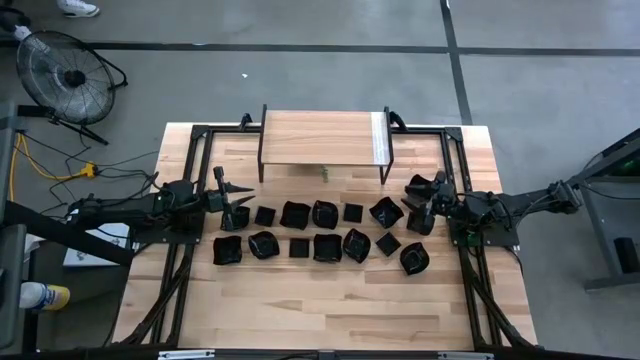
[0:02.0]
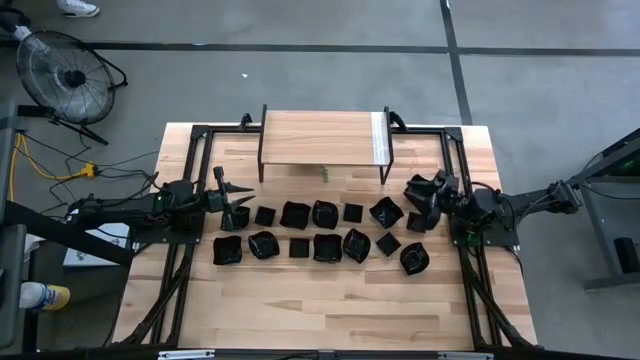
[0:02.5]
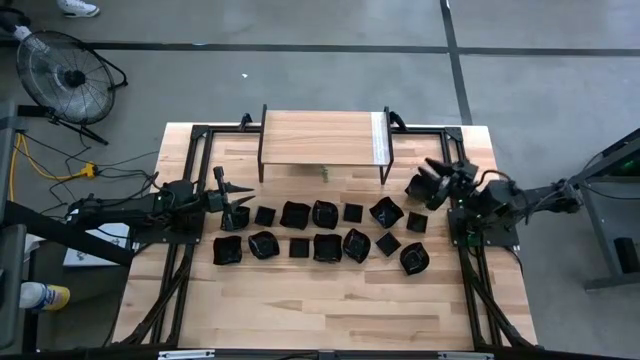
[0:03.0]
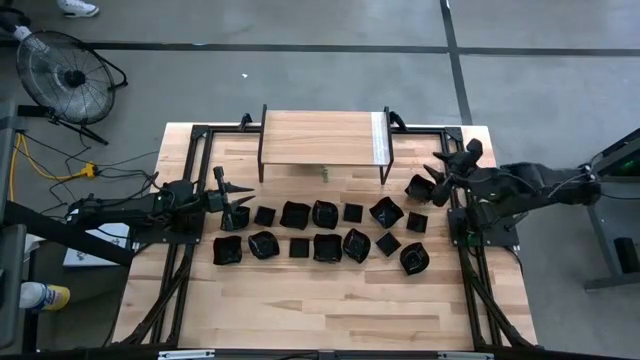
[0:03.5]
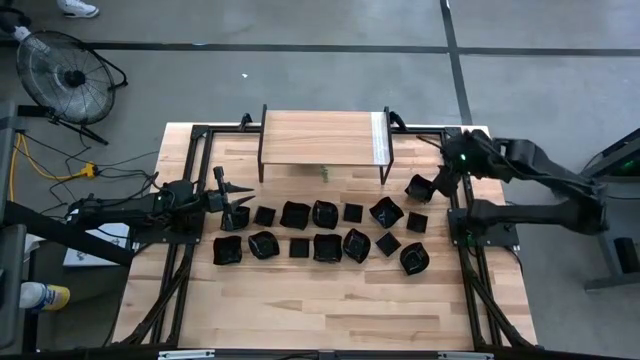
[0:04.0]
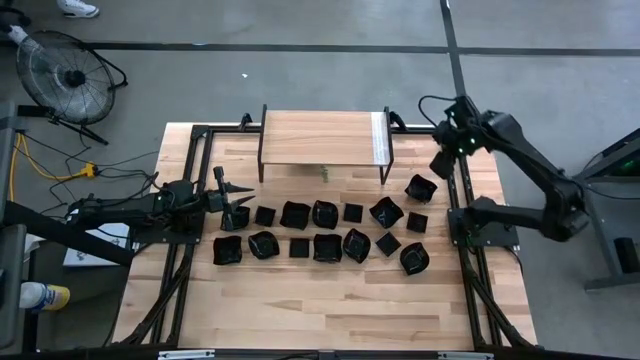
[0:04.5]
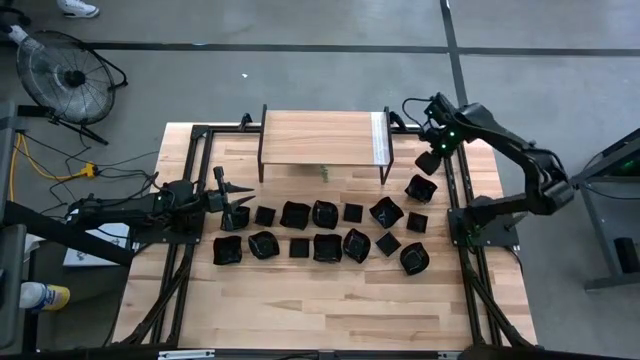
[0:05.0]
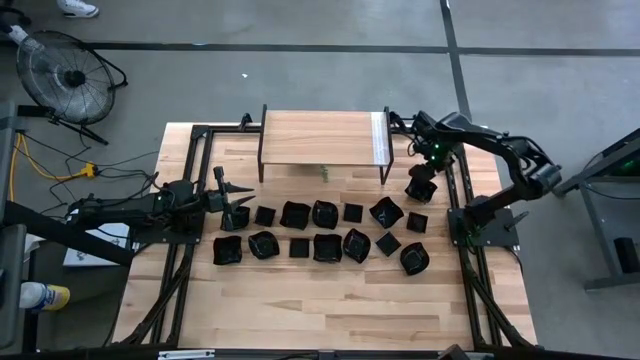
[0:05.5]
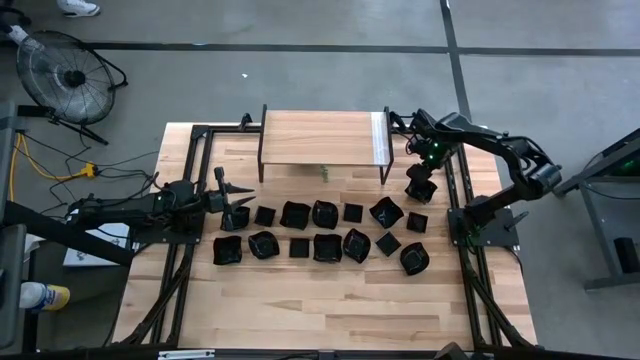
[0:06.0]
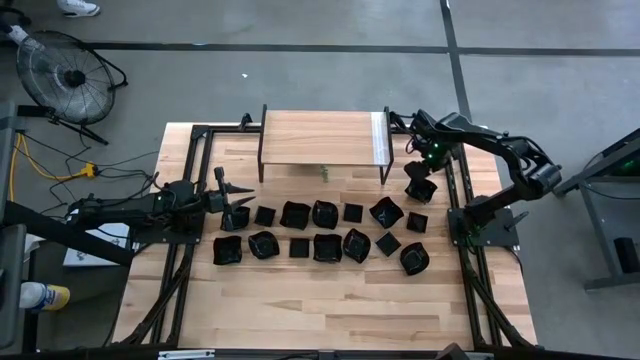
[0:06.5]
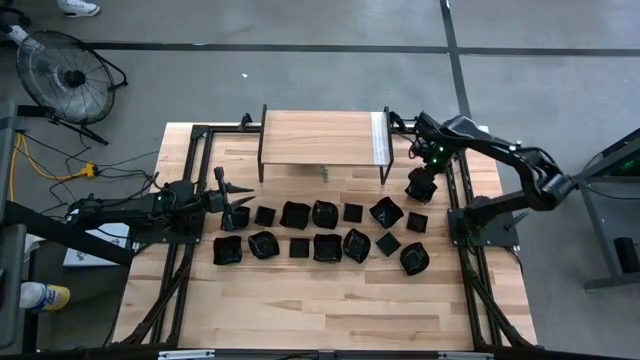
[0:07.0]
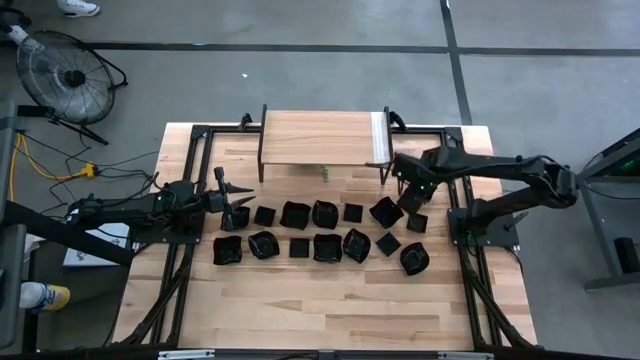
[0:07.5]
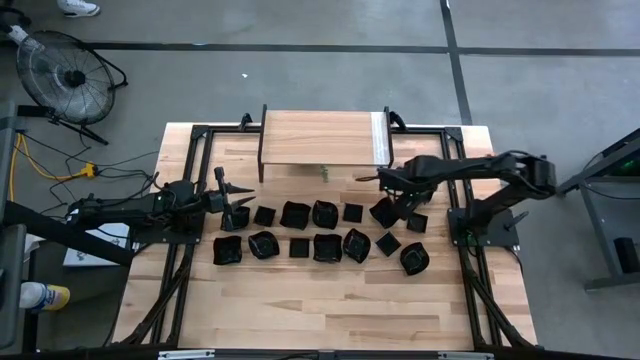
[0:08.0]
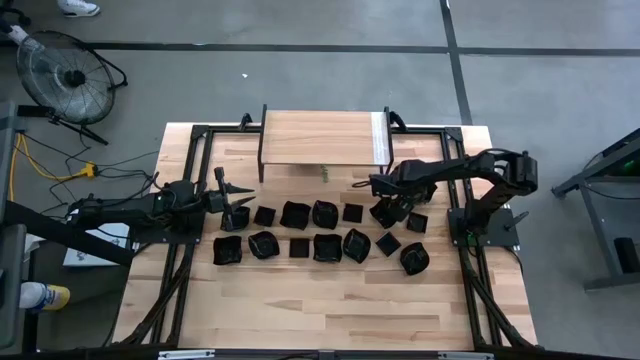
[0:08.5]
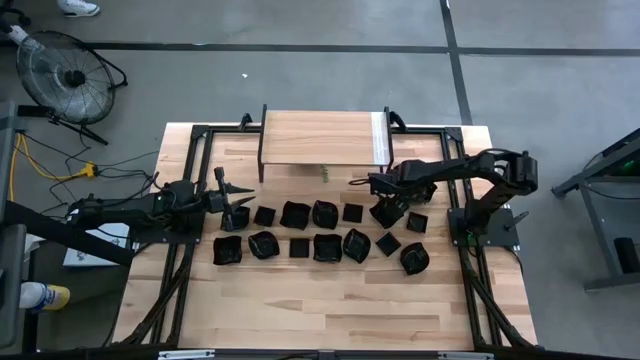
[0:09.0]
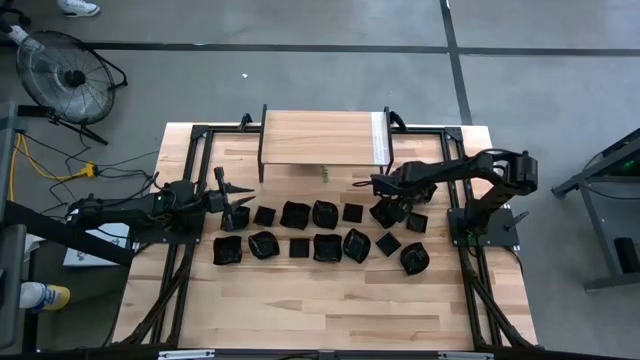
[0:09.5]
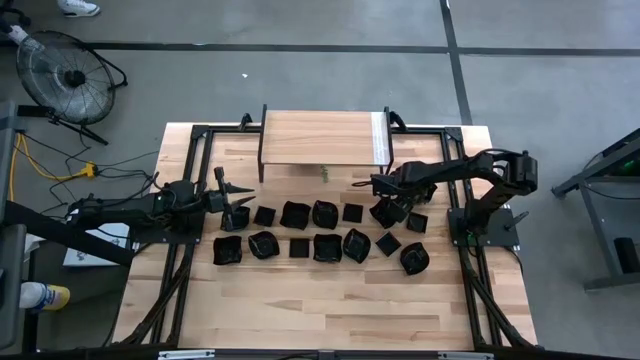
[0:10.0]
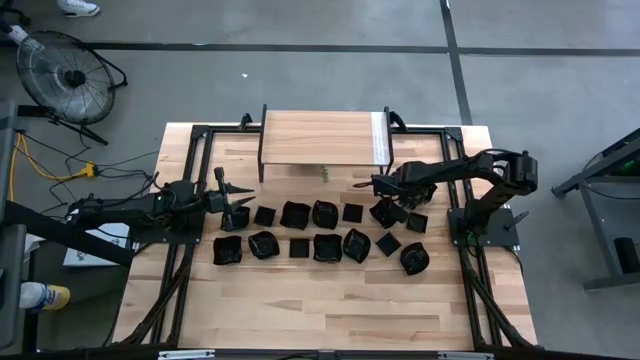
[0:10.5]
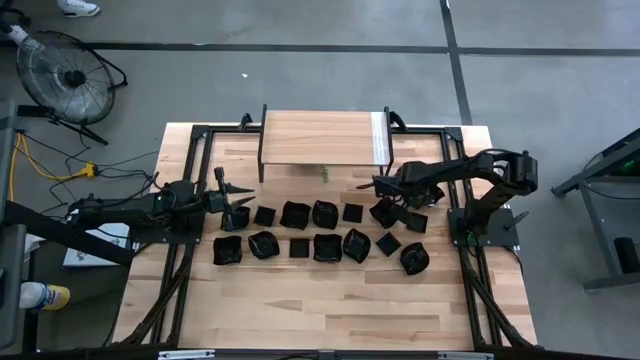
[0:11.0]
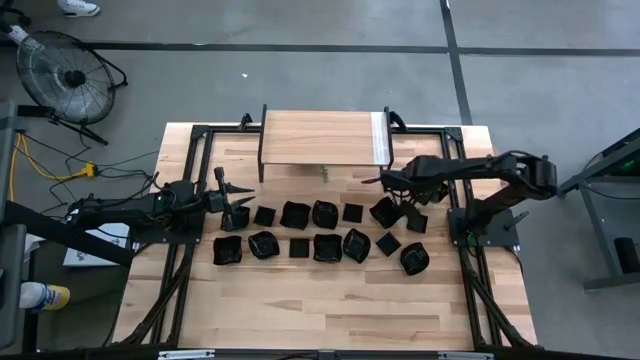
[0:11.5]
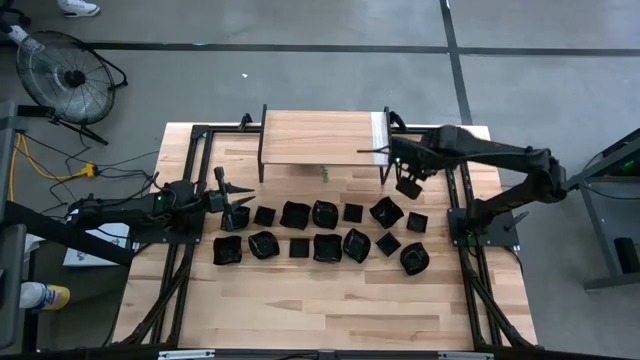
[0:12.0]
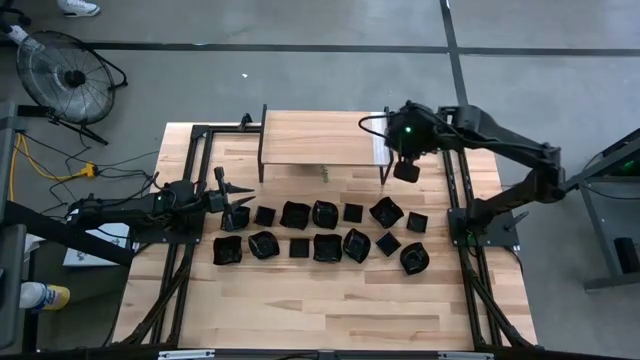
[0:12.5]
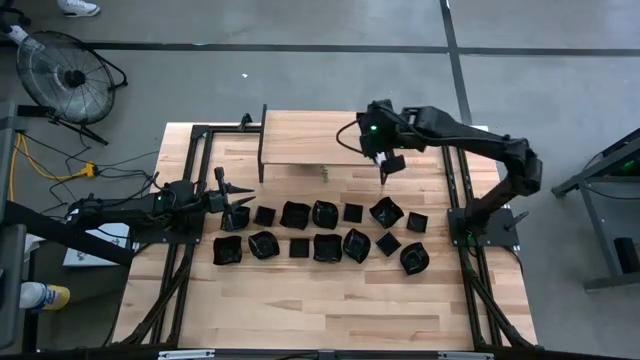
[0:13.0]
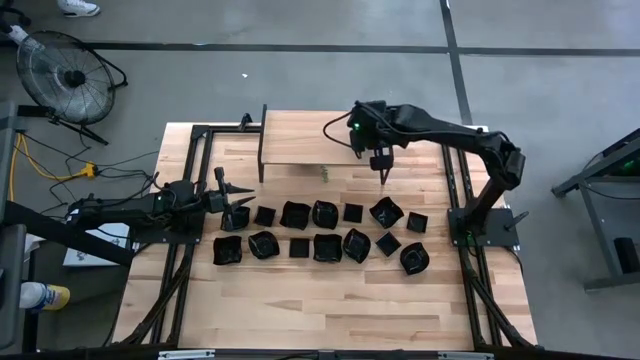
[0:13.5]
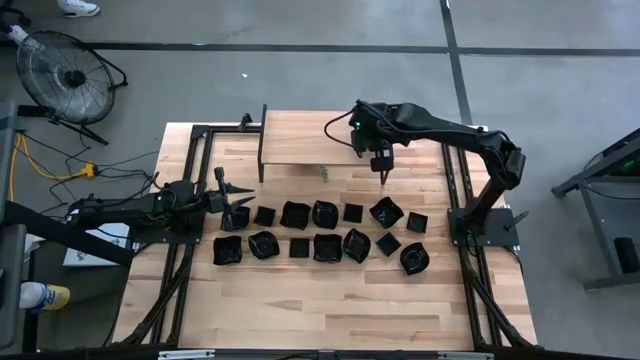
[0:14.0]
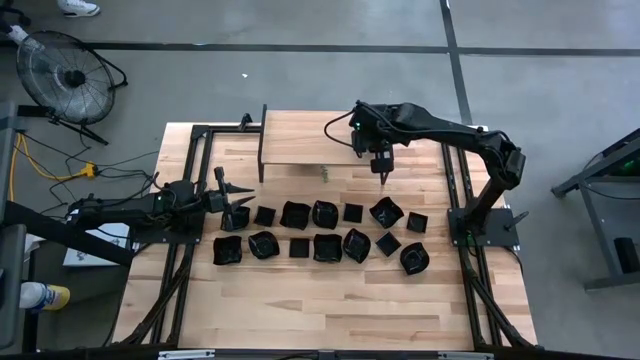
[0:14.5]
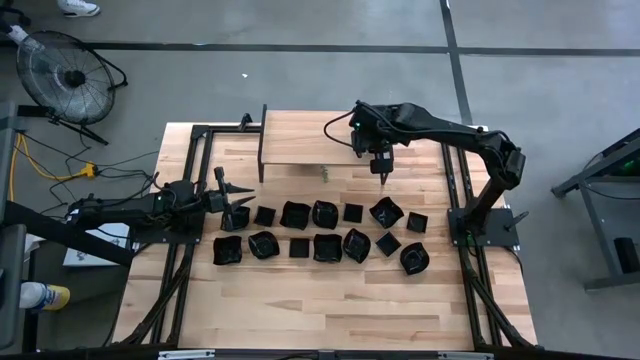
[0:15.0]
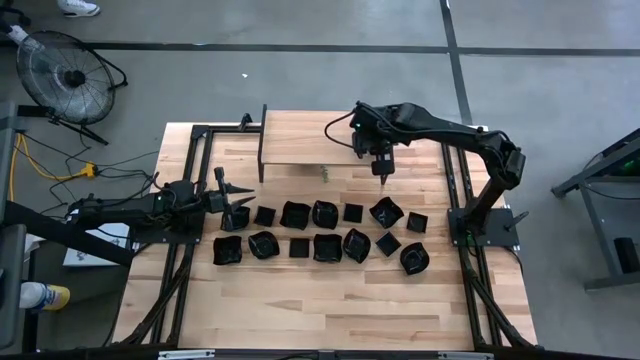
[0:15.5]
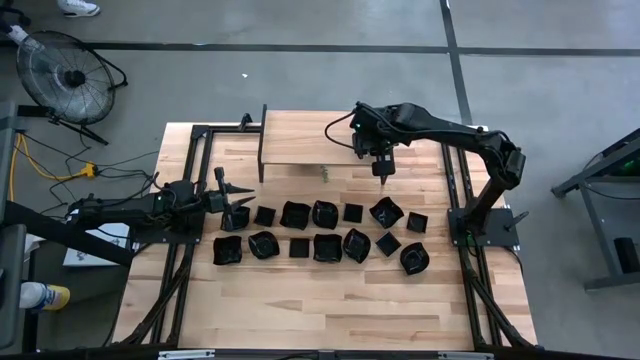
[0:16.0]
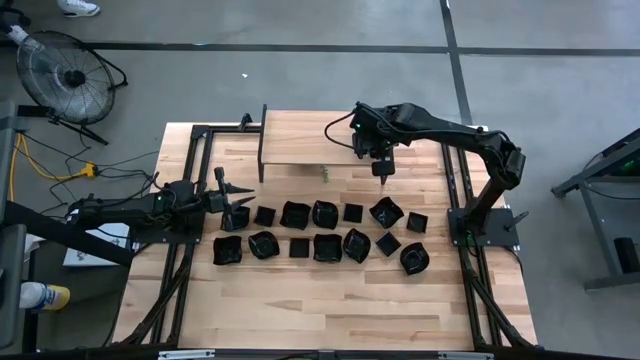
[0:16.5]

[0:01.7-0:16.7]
Task: Pick & Place Mini shaped plates
Put the distorted square plate on the shelf

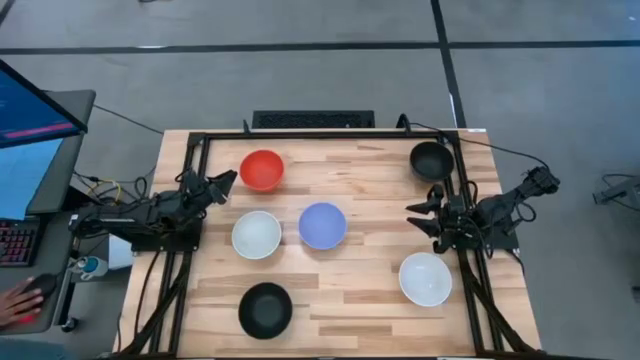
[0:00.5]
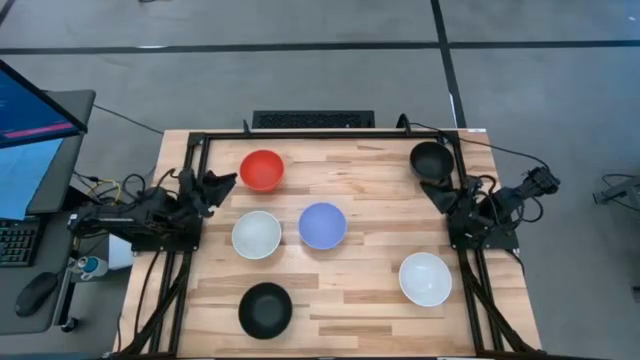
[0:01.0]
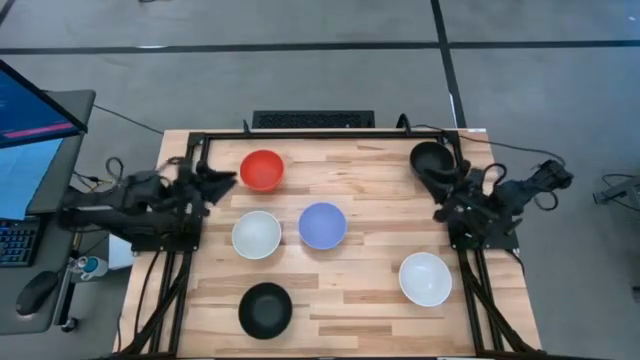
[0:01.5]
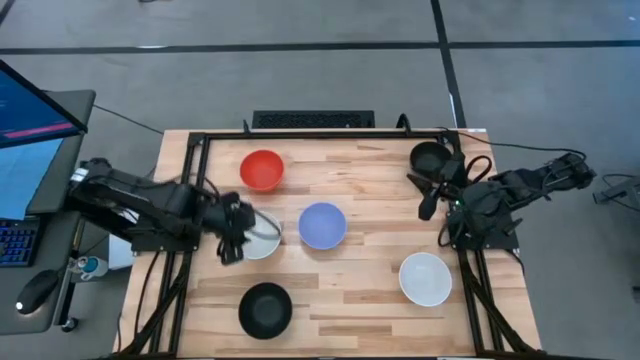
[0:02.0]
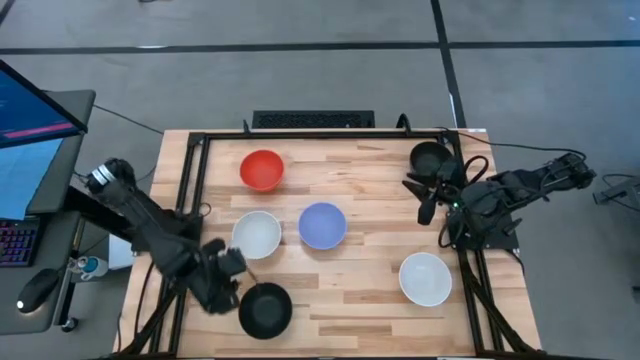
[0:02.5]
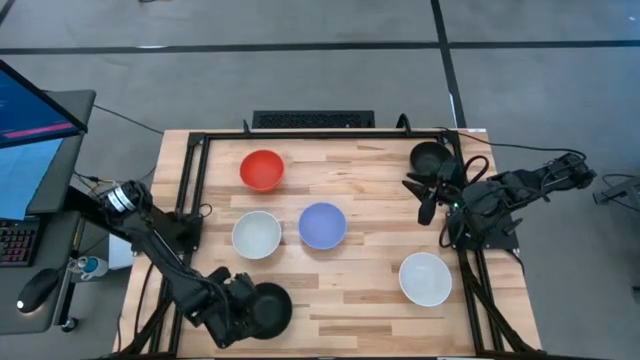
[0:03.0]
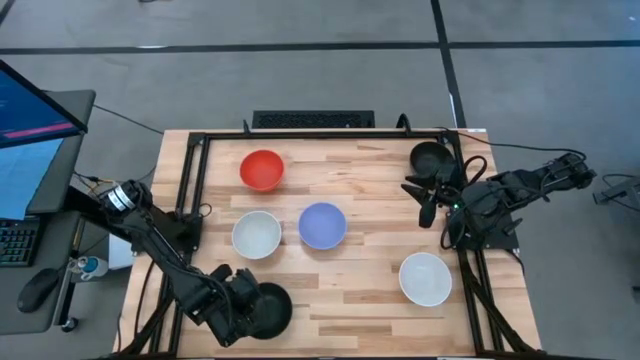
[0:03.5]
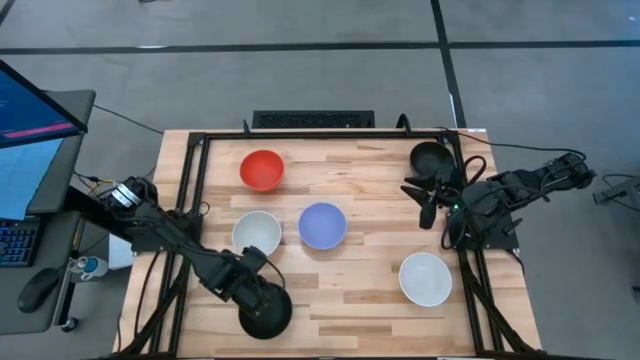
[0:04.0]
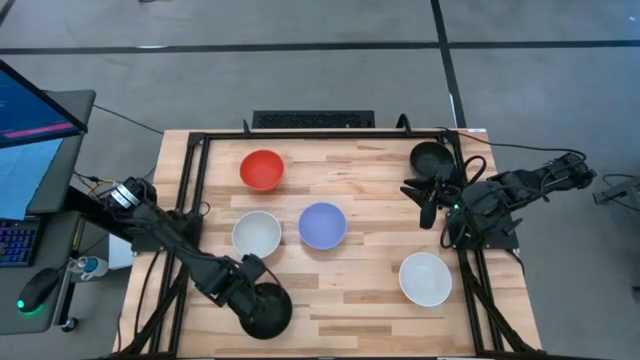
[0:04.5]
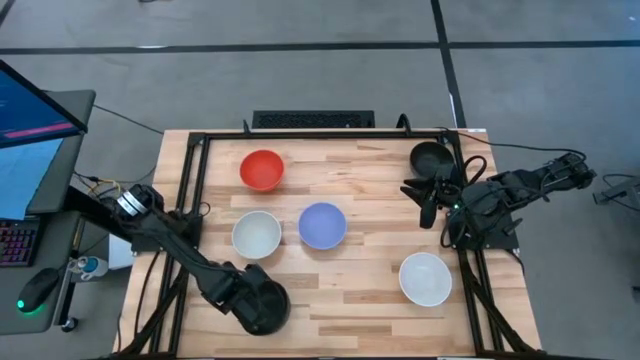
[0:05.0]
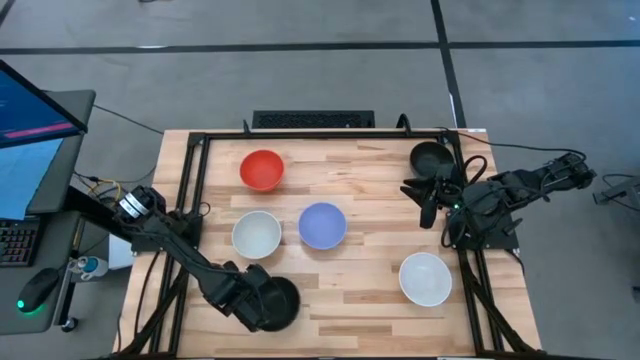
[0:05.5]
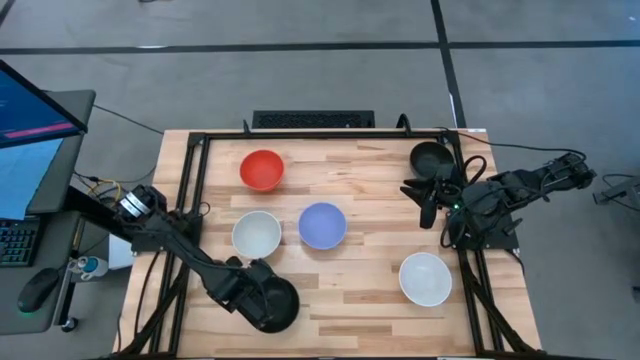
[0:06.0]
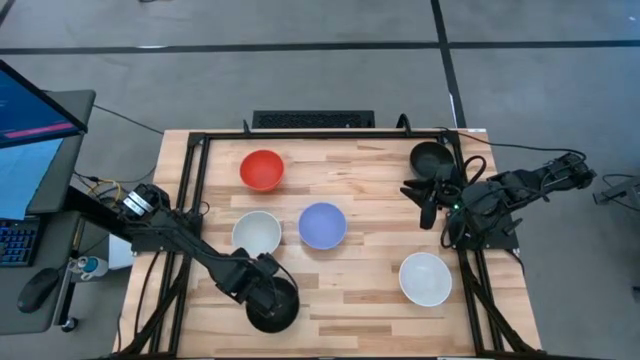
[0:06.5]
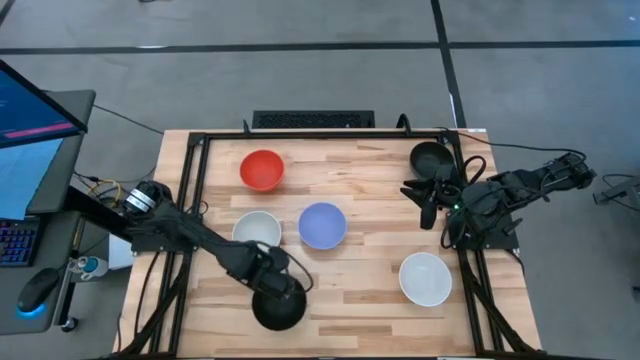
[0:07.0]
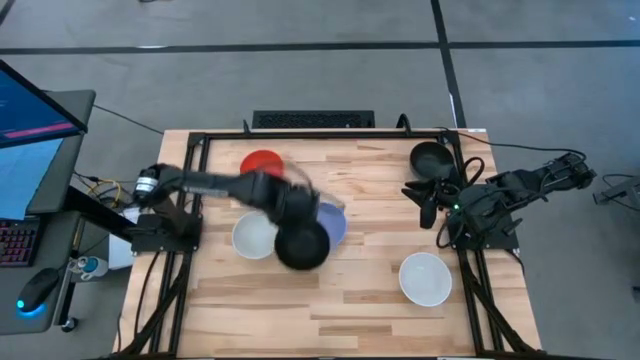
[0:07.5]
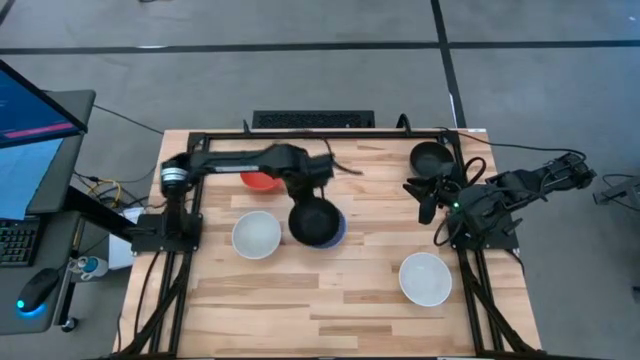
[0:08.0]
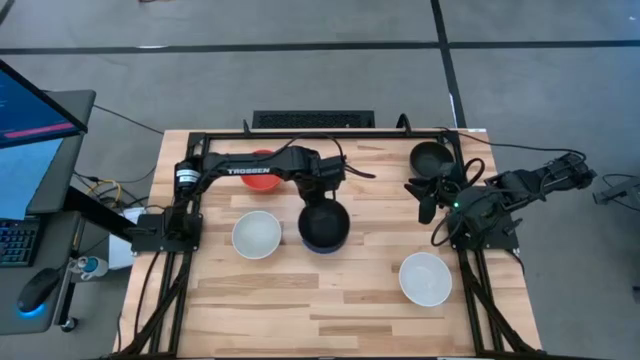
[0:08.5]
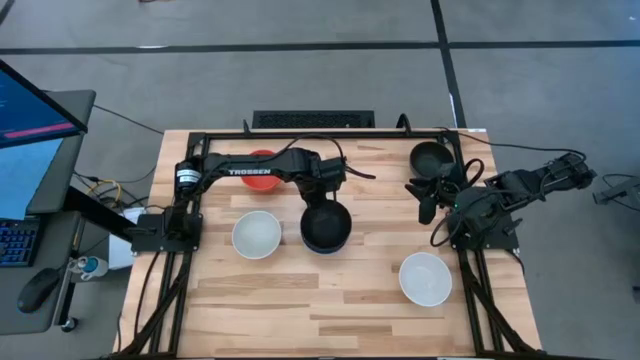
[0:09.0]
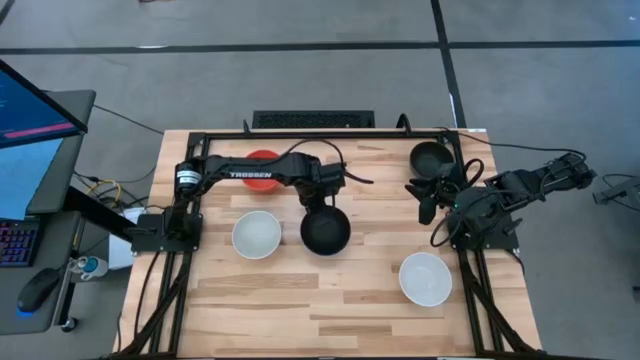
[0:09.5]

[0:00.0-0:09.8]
Task: Nest bowls inside each other
Stack the bottom black bowl on top of the light blue bowl
